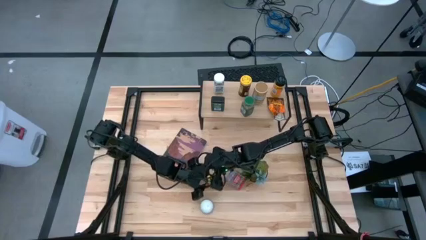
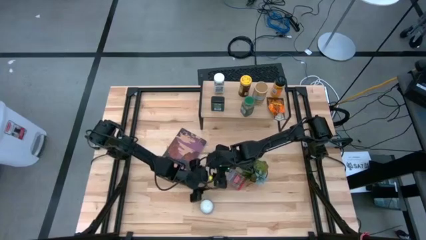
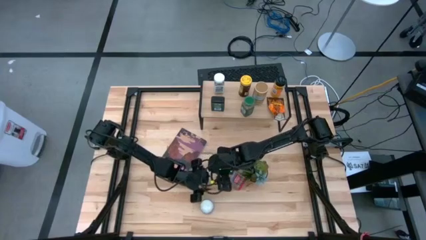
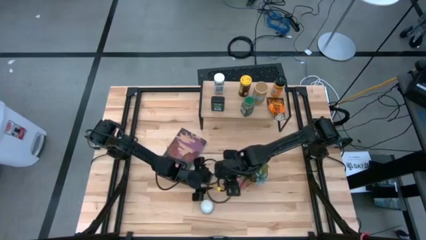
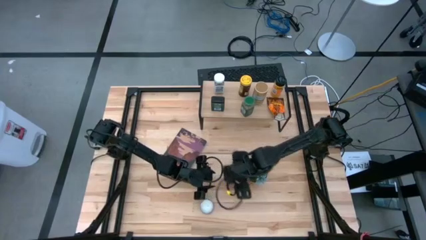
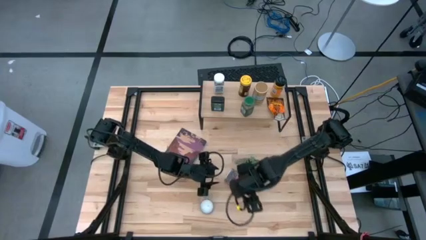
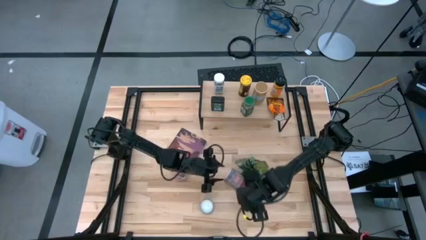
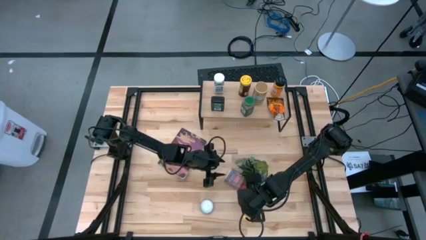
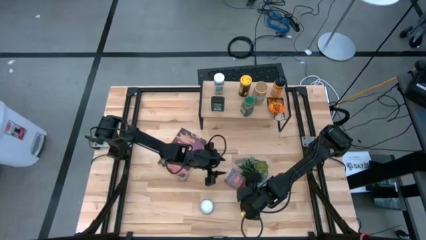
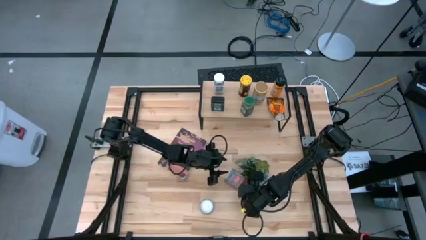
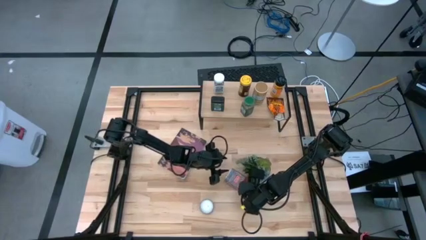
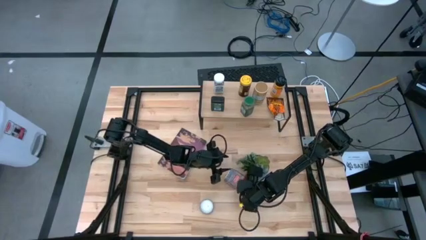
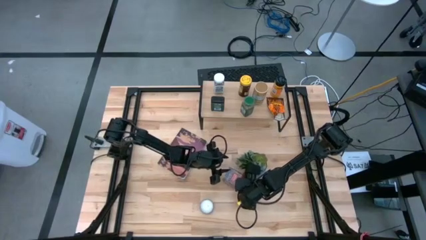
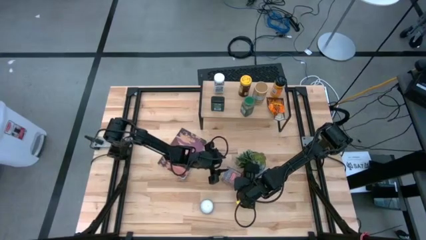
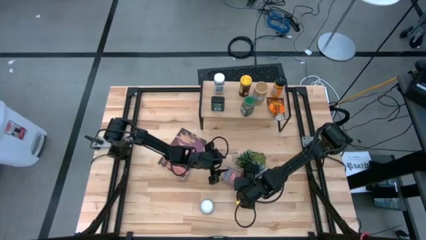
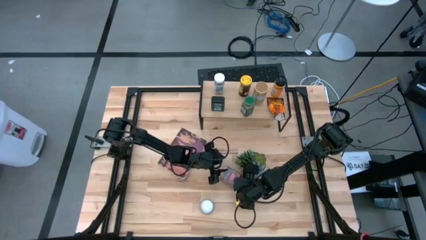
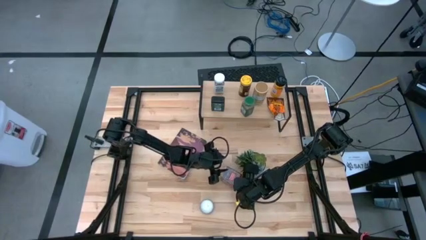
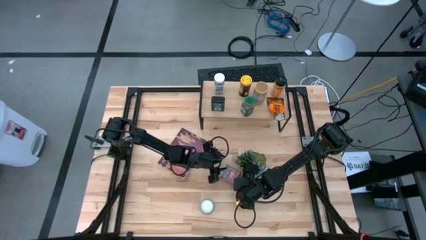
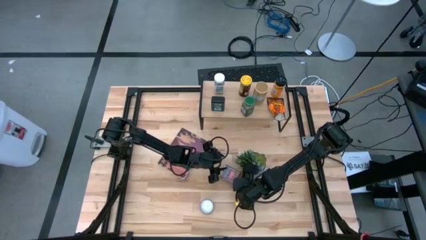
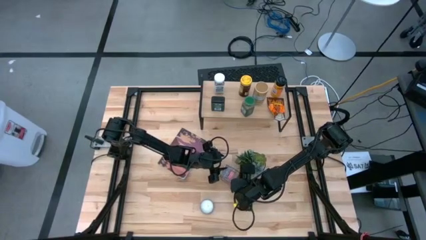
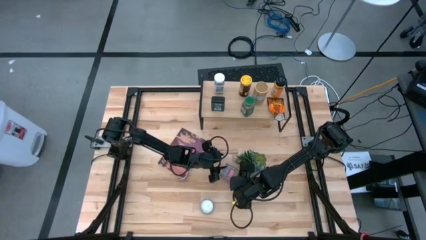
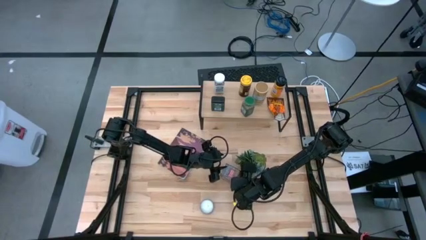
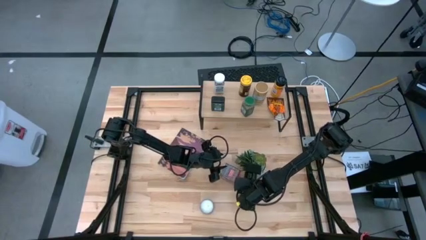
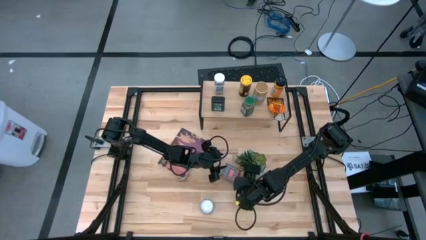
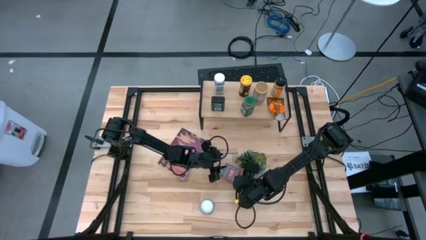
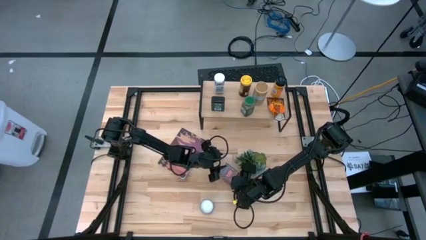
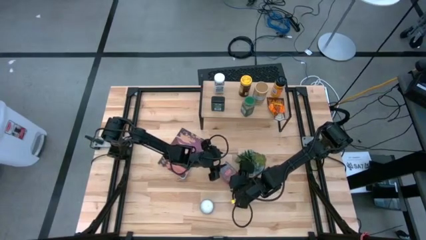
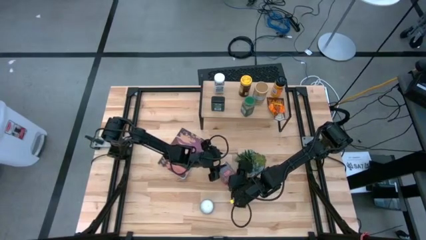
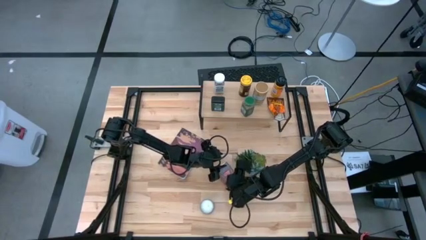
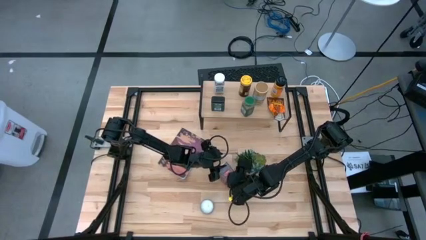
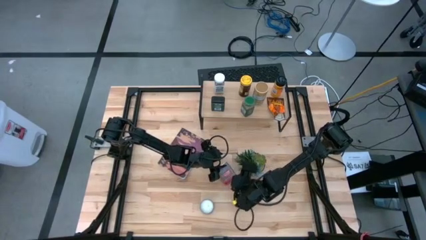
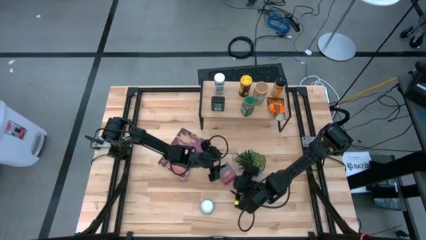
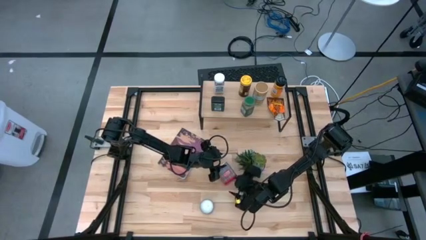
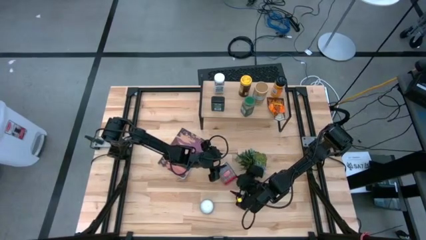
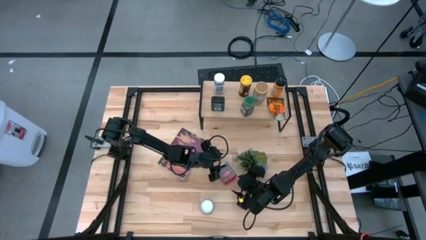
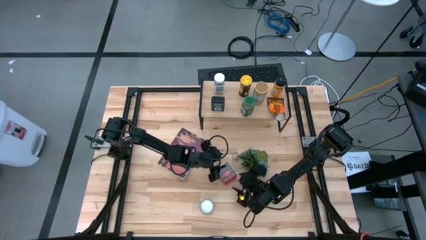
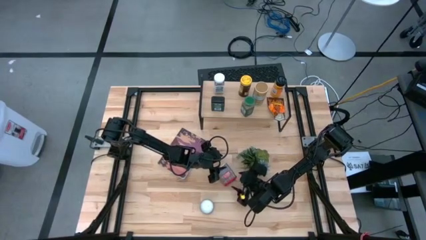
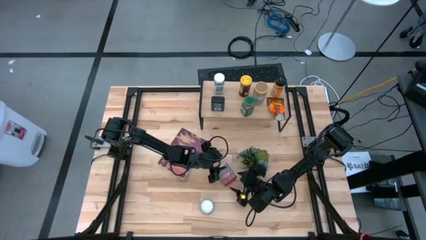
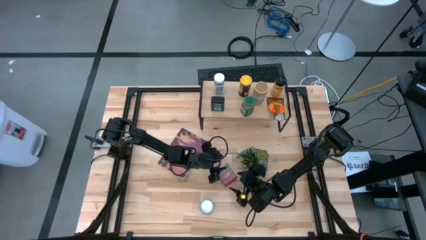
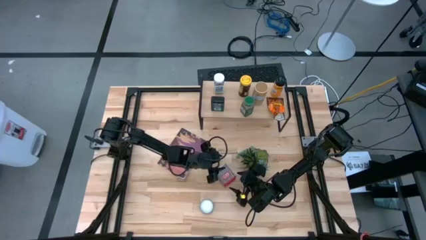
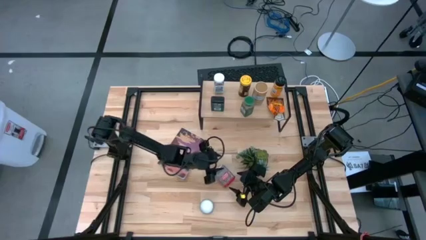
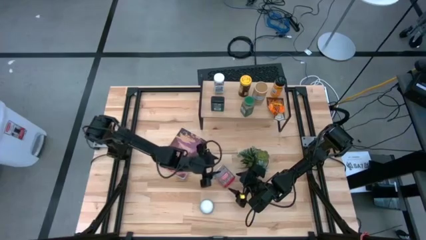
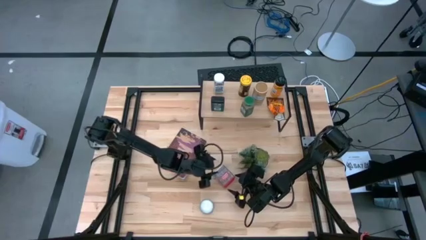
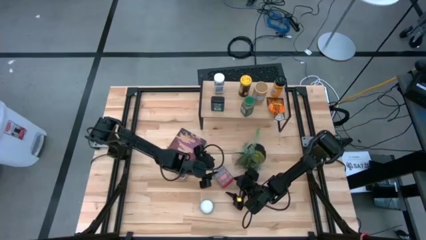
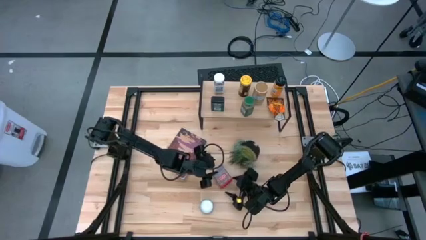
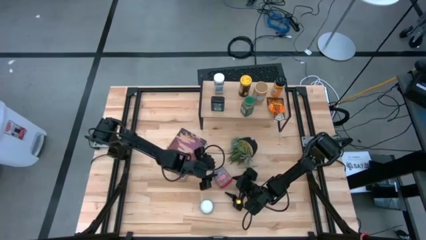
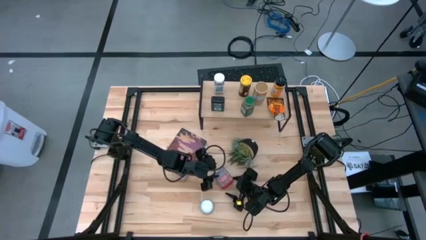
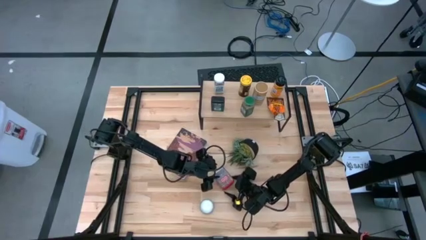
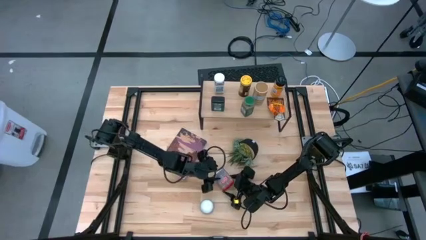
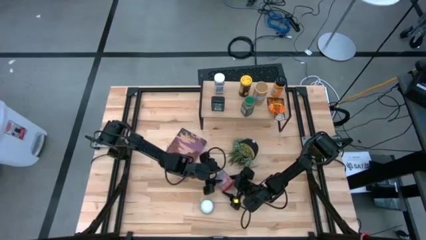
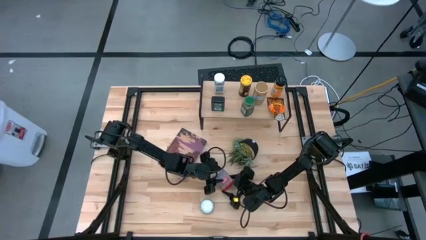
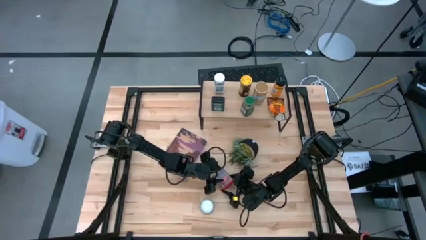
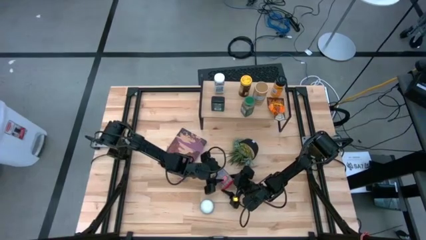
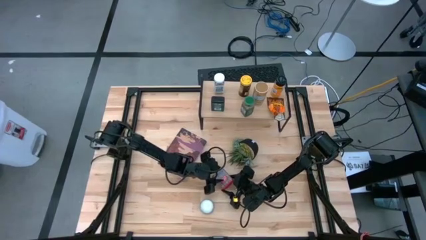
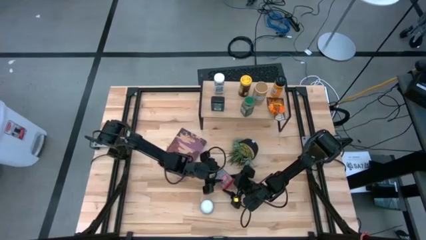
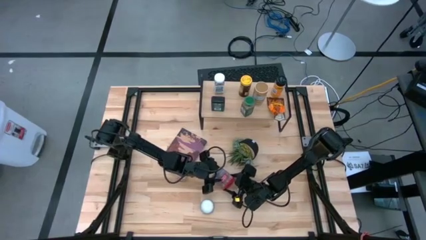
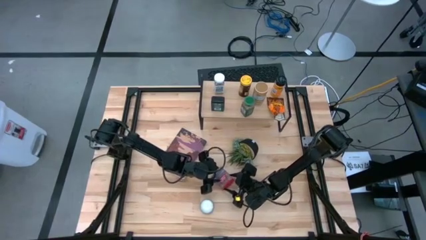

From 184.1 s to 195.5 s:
Task: Shelf spices
Put the red seasoning can on the shelf

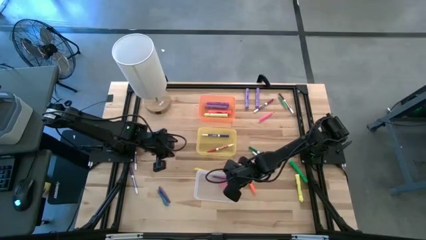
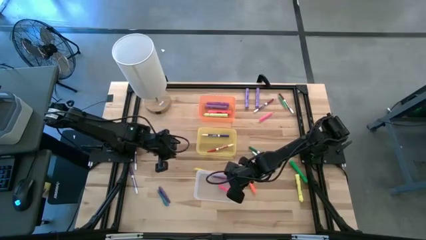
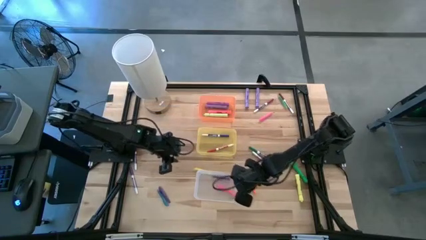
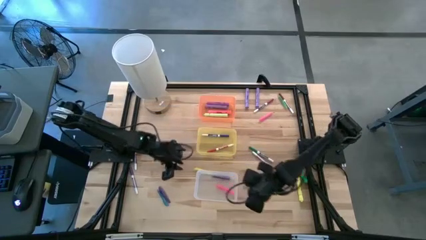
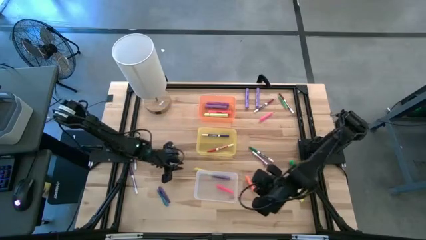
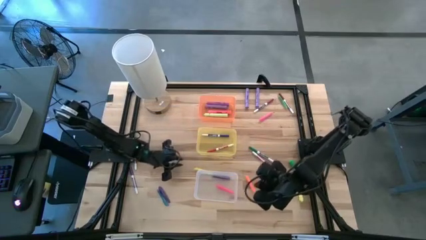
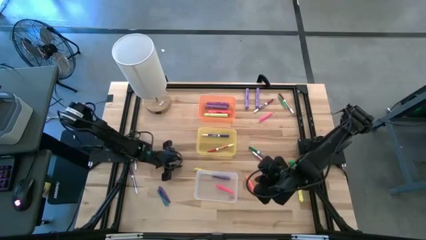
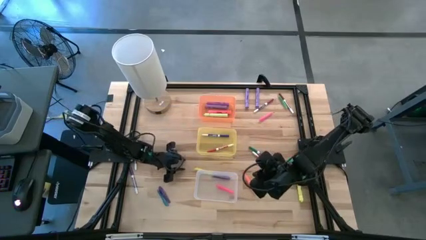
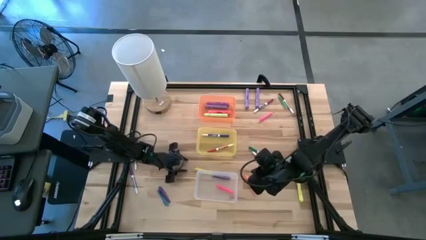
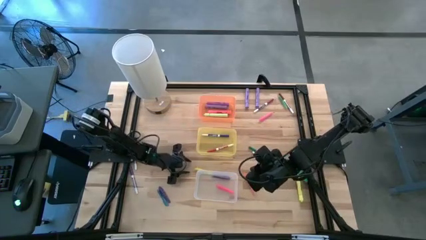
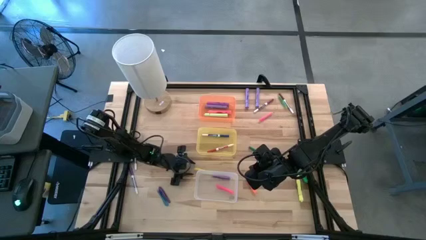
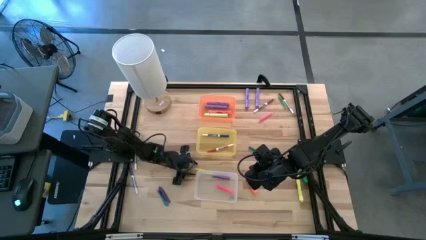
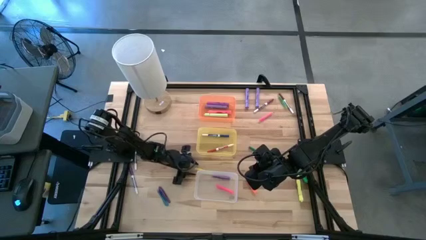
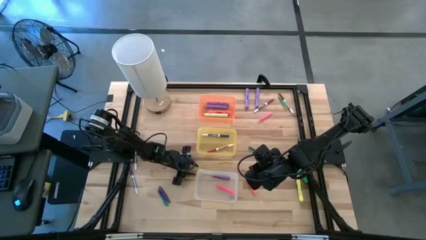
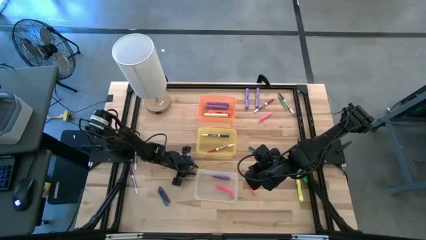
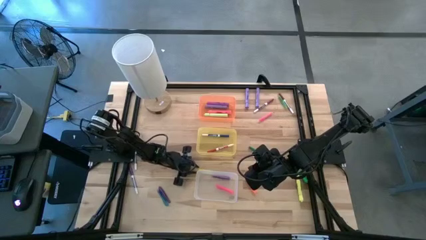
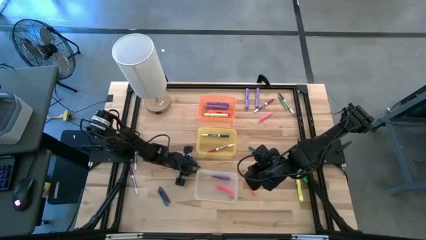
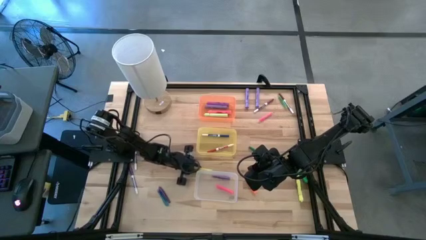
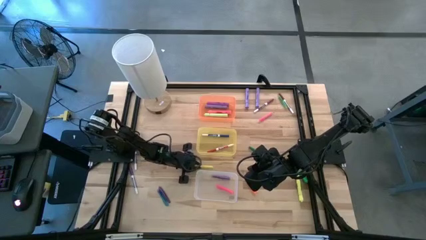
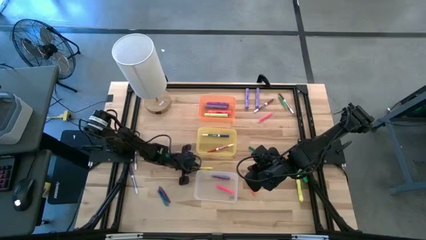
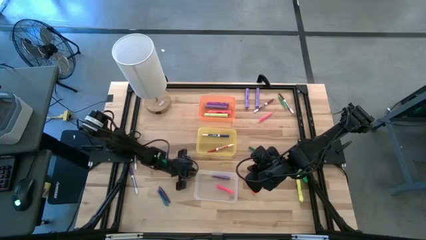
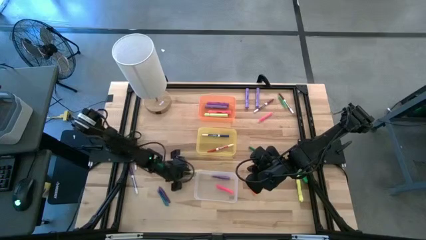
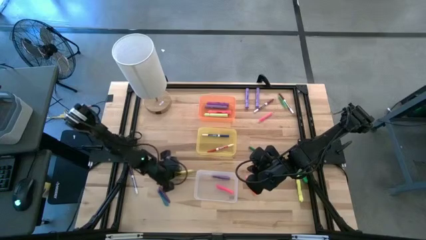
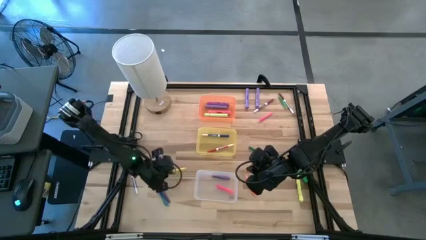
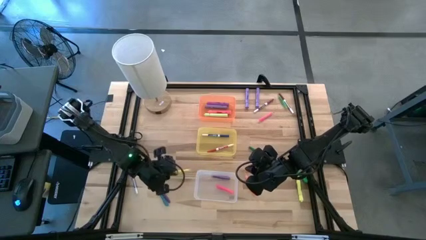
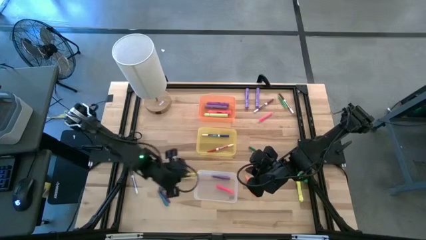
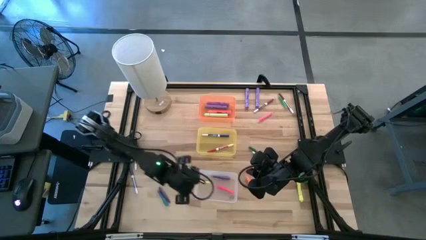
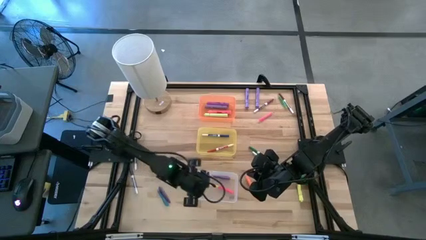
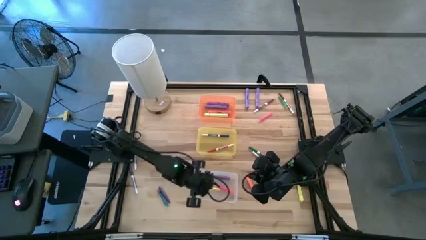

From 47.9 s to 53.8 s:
Task: Pick & Place Markers
Put the yellow pen into the white bin
